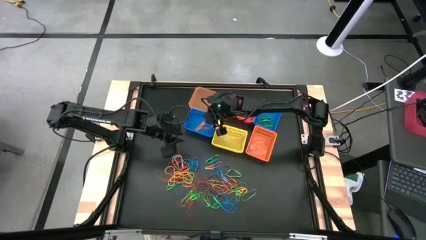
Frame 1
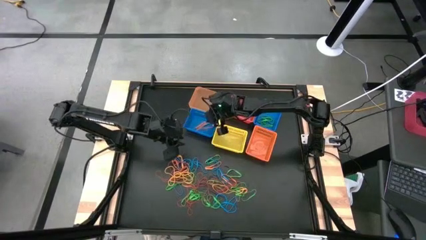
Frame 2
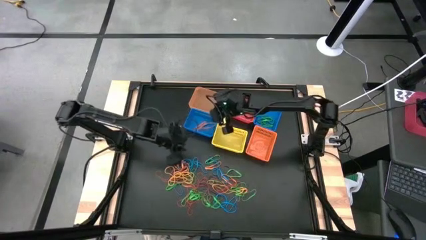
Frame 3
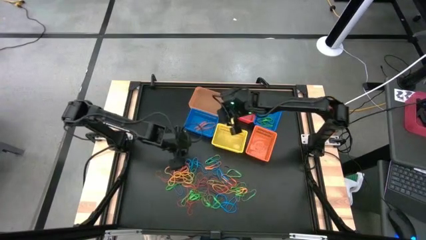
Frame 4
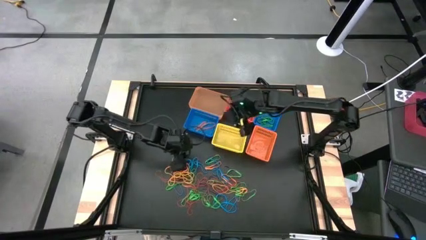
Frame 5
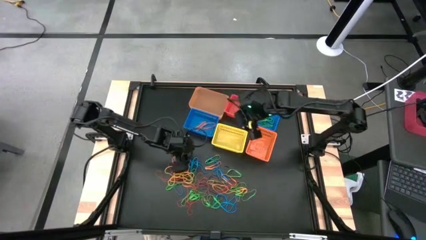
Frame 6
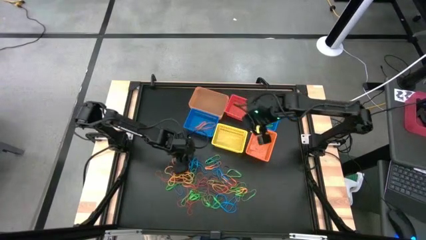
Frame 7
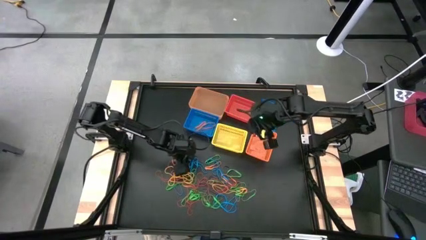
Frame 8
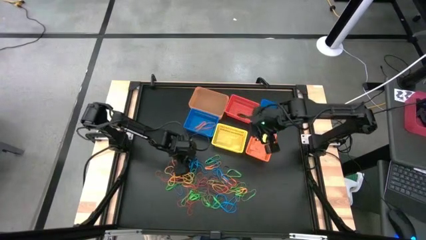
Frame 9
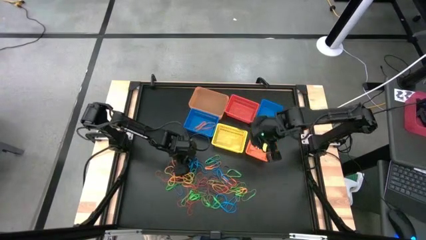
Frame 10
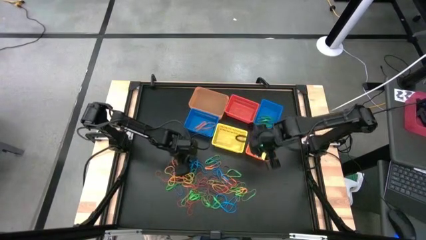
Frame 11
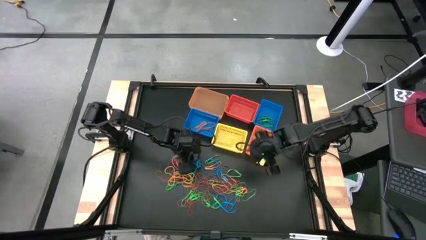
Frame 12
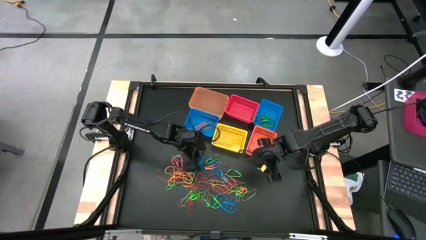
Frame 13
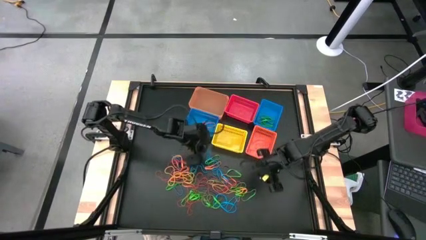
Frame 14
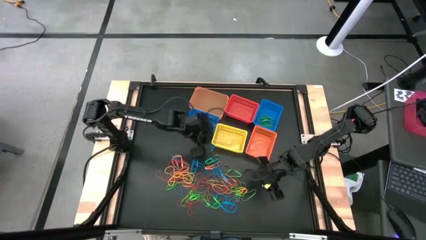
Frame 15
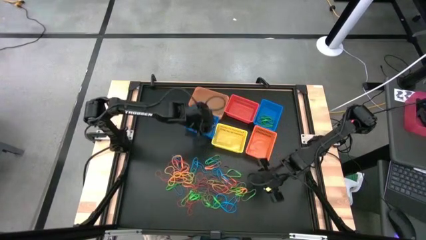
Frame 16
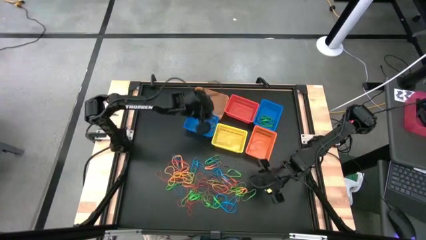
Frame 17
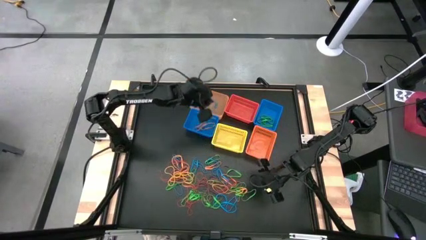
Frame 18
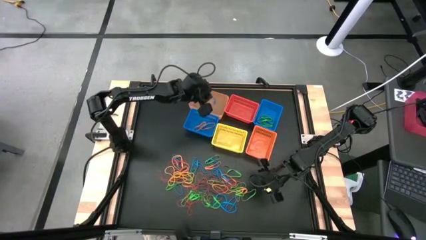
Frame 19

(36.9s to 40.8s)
Task: Sort rubber bands into baskets
Put the rubber band into the transparent orange basket

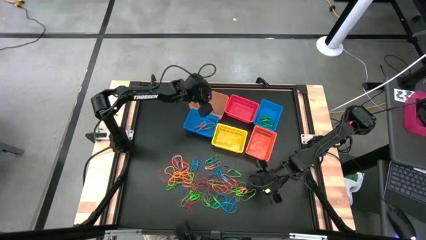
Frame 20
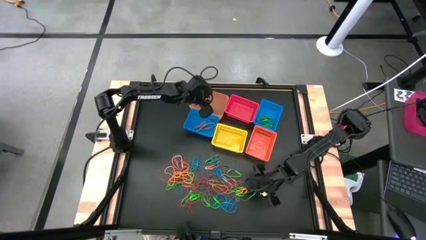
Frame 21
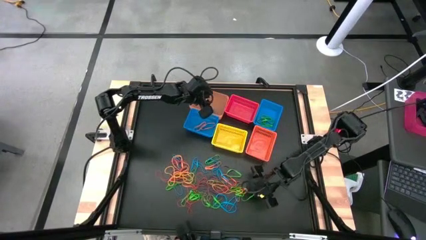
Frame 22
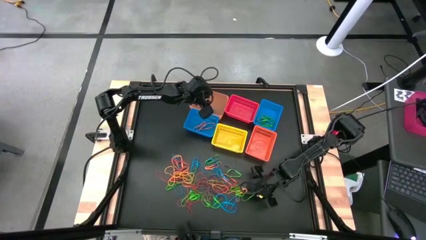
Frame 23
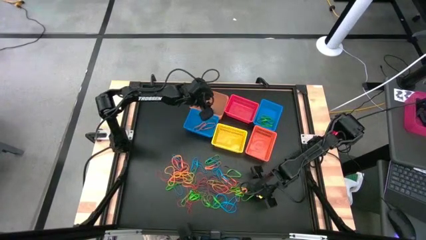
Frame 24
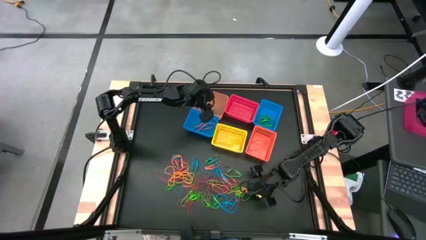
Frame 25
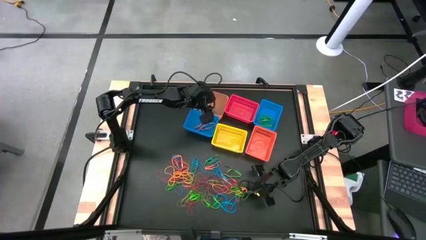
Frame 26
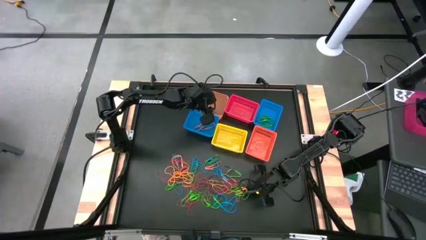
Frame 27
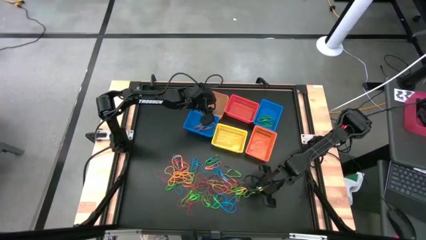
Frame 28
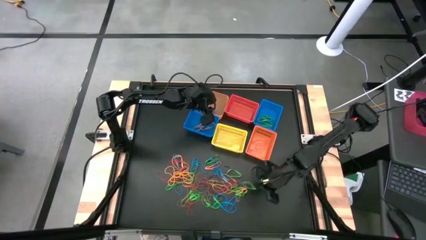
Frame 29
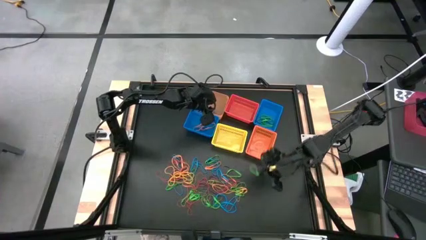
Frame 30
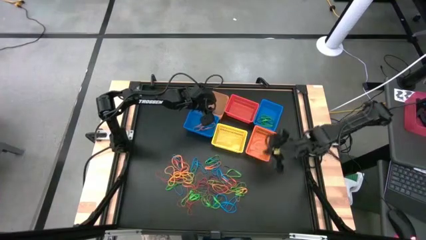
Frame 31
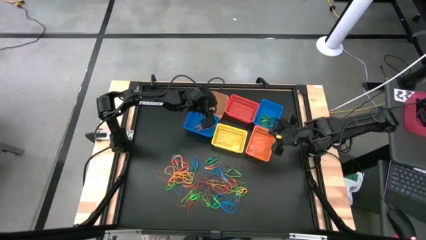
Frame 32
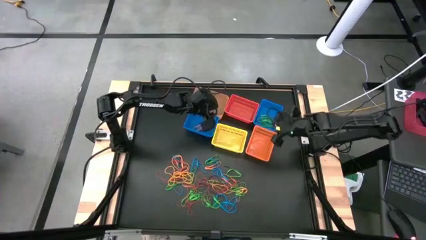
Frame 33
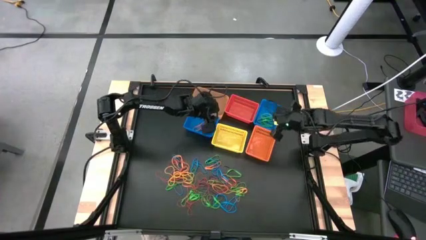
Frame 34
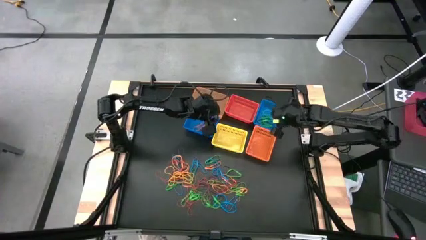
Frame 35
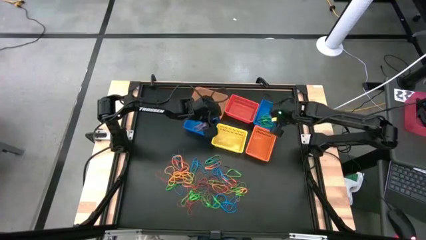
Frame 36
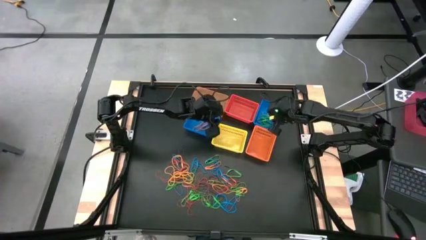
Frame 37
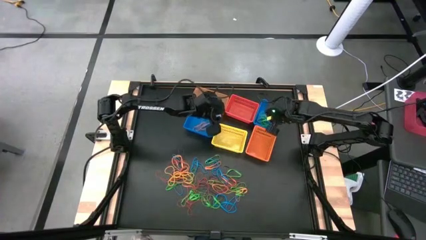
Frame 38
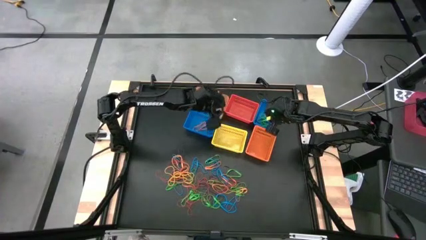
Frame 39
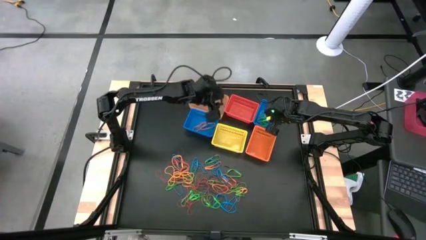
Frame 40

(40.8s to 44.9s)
Put the green rubber band into the right blue basket

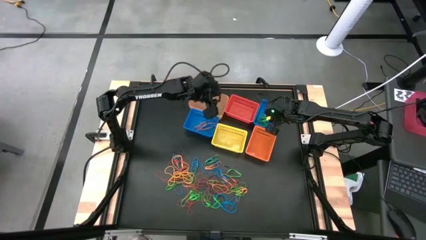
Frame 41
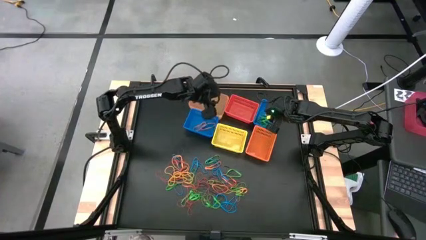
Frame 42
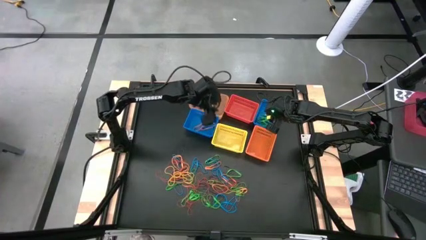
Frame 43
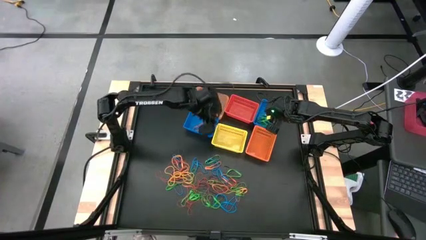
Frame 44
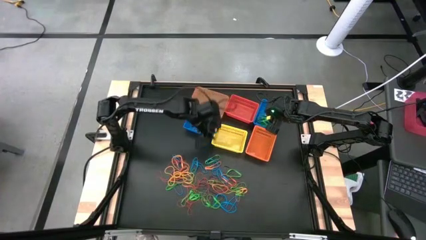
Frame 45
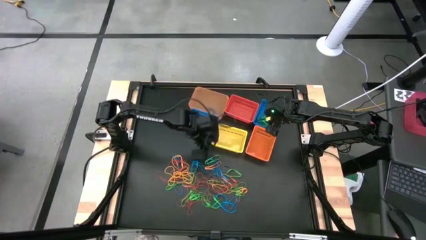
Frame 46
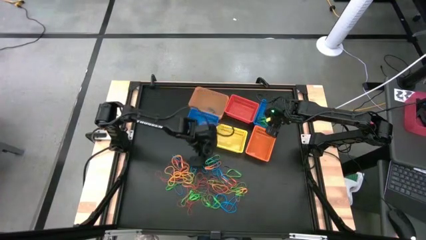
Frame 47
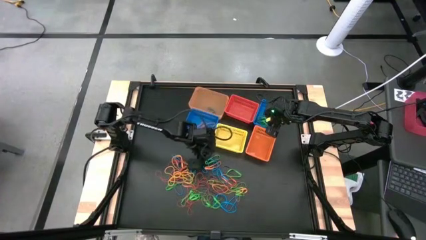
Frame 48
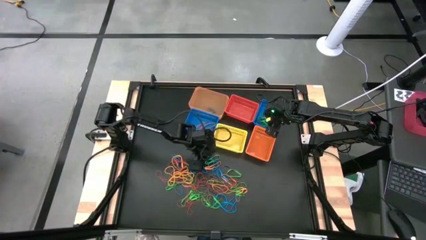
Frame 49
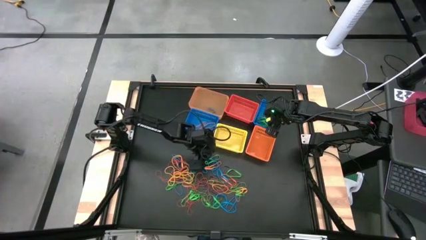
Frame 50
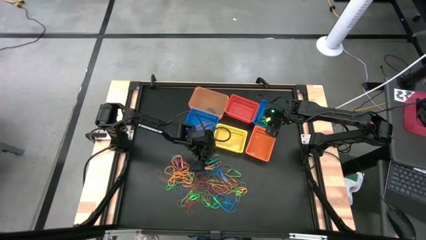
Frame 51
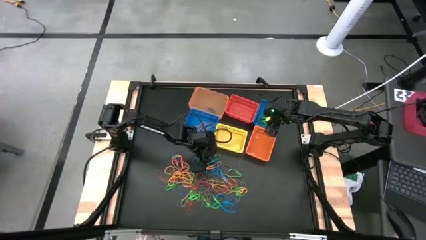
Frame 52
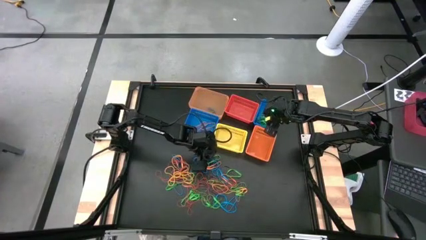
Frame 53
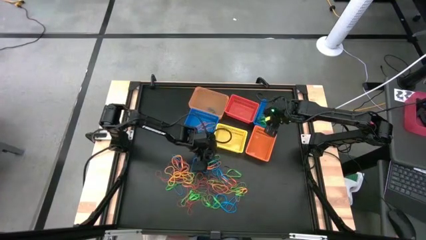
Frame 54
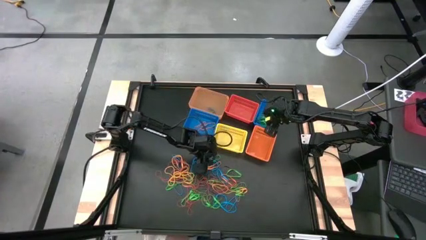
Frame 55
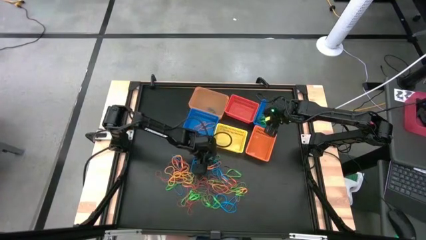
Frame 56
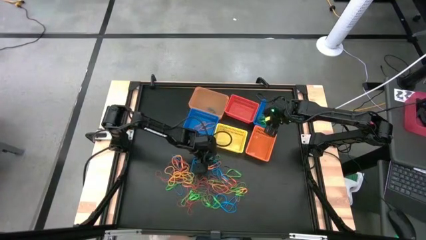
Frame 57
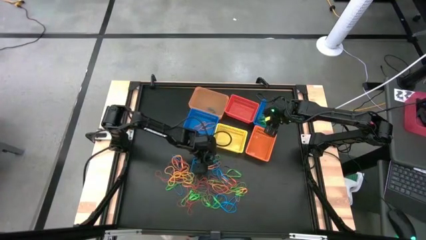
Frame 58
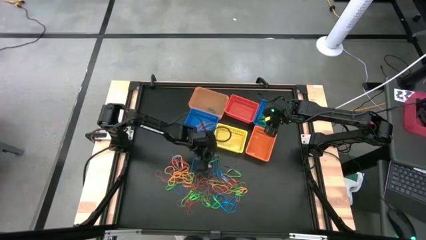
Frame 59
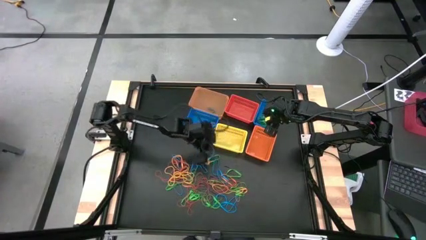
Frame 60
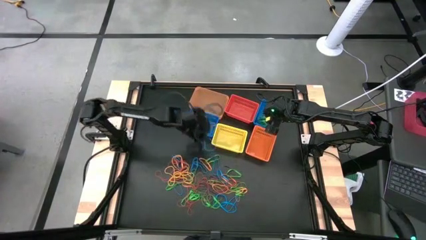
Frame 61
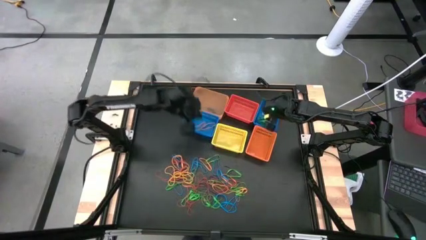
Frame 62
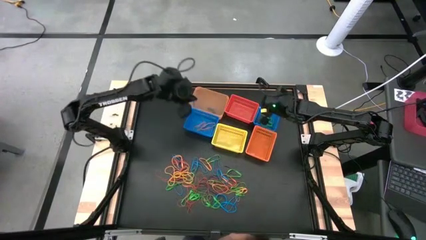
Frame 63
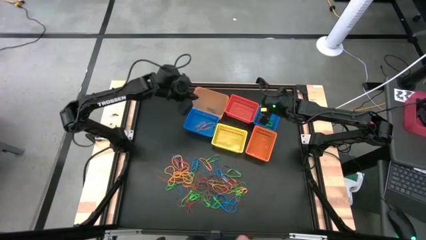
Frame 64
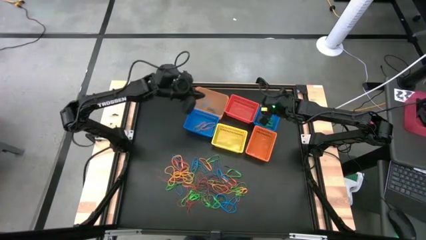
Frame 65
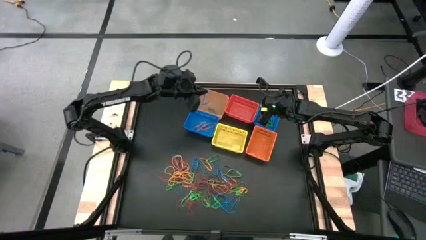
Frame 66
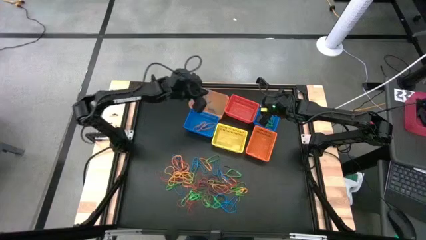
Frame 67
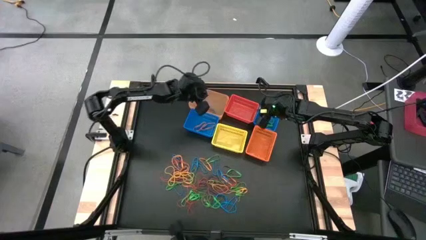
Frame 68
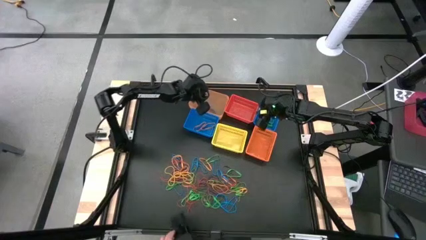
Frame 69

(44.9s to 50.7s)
Put the blue rubber band into the transparent orange basket

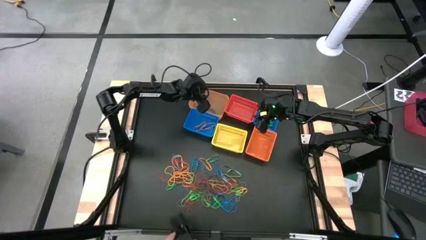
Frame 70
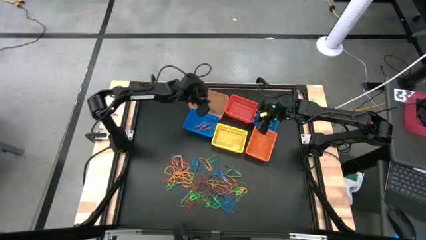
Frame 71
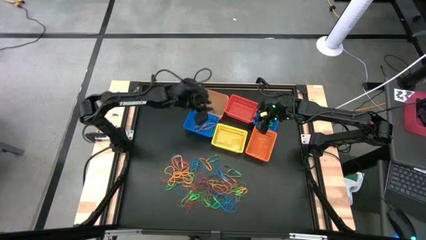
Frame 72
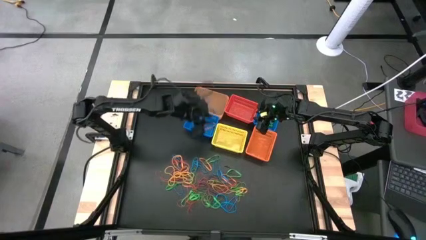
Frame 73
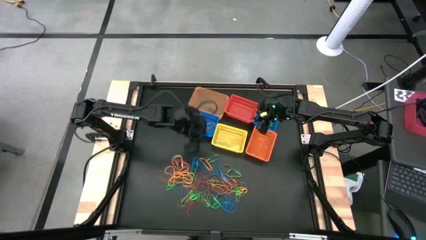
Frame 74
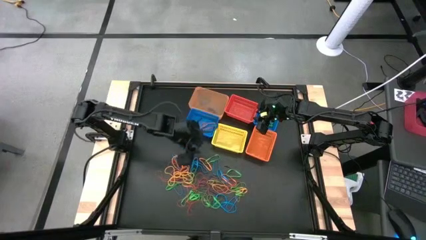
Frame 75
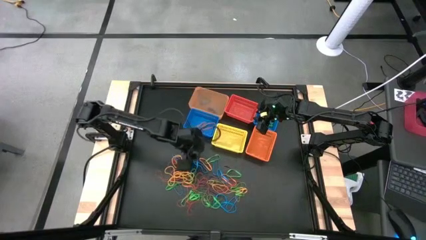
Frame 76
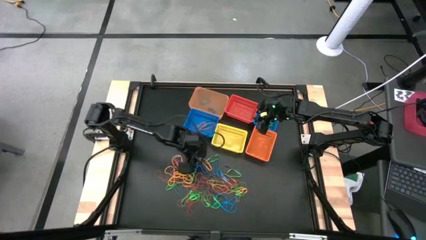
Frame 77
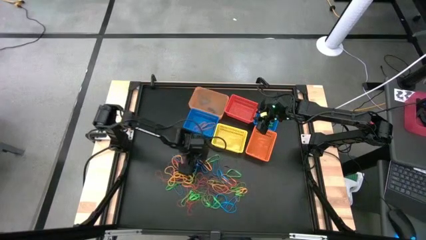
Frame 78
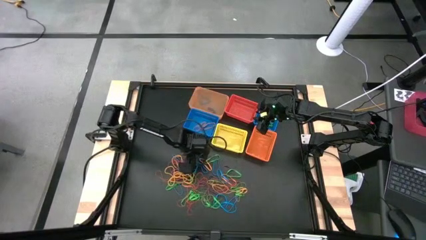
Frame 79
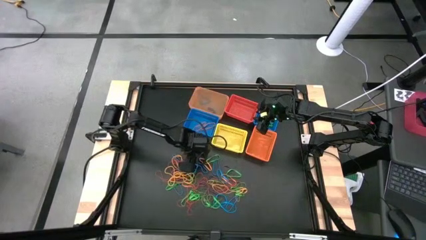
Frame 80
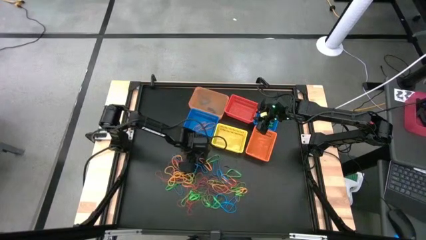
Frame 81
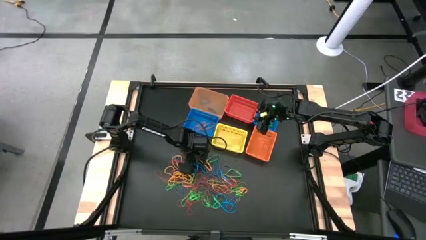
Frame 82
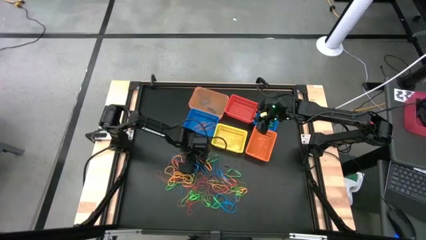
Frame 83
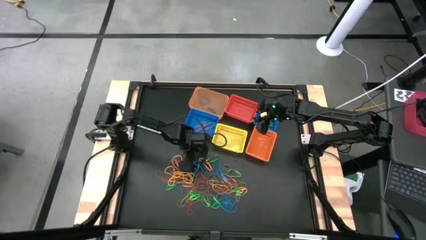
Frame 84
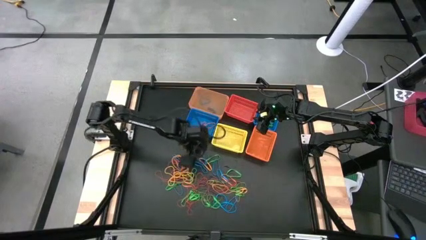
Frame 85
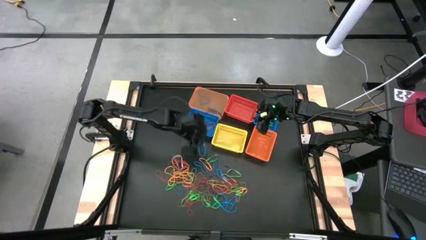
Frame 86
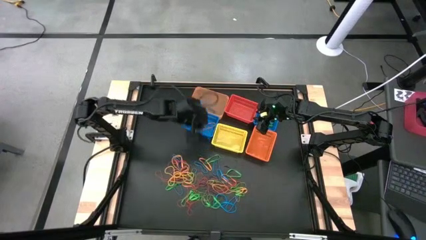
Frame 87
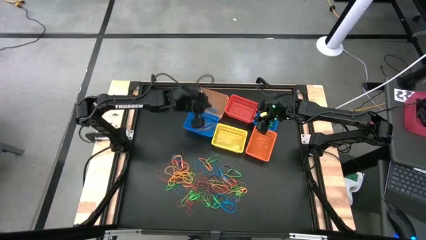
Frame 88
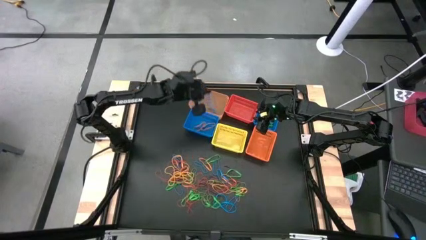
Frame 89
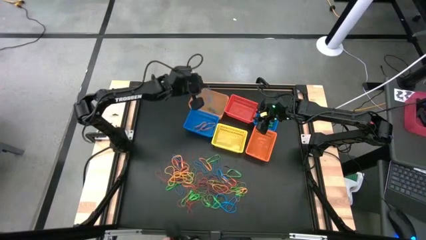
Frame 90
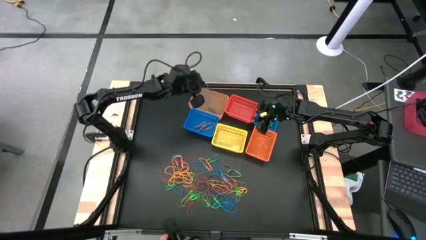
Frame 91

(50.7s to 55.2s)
Put the blue rubber band into the transparent orange basket
